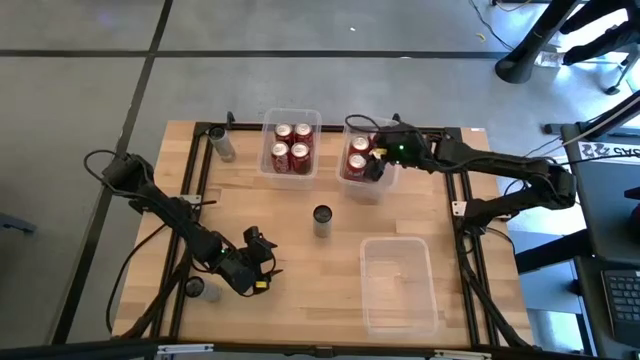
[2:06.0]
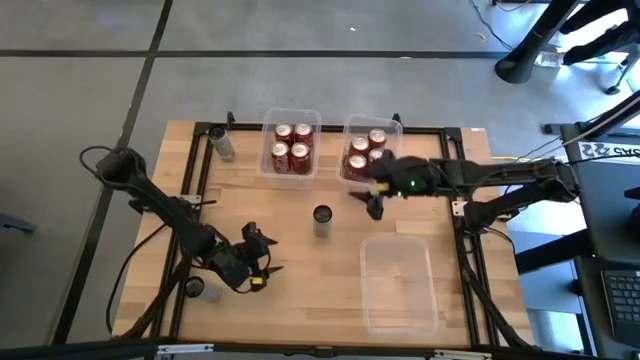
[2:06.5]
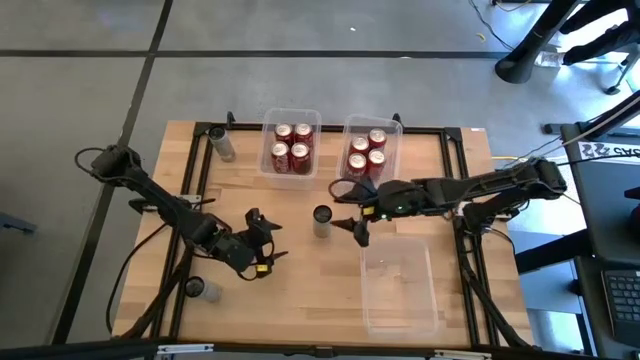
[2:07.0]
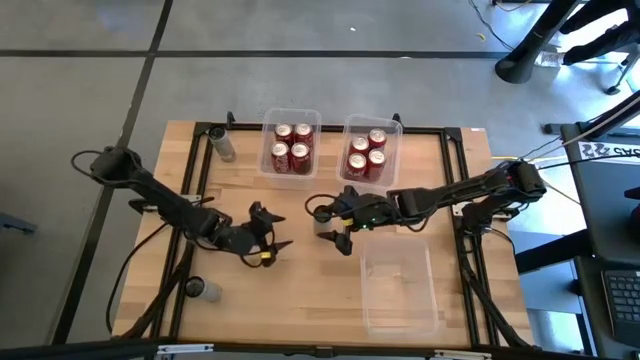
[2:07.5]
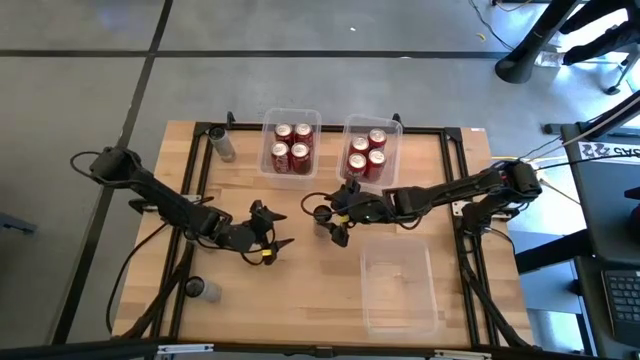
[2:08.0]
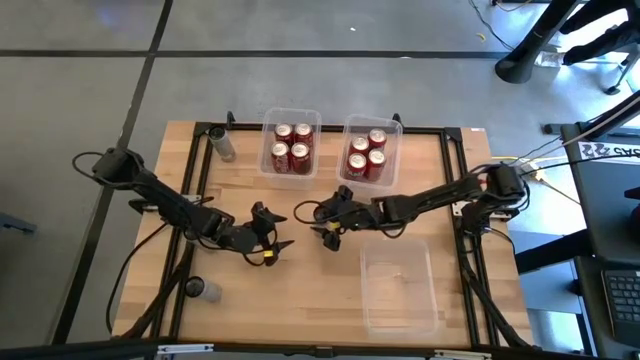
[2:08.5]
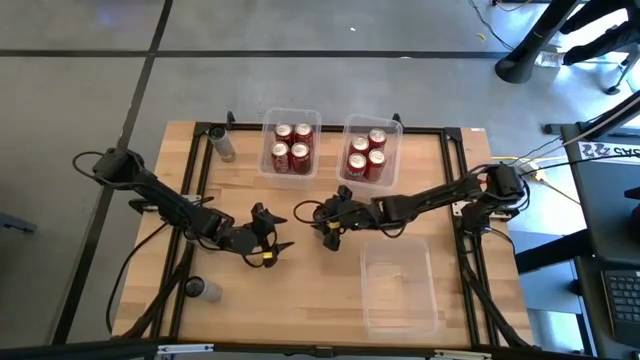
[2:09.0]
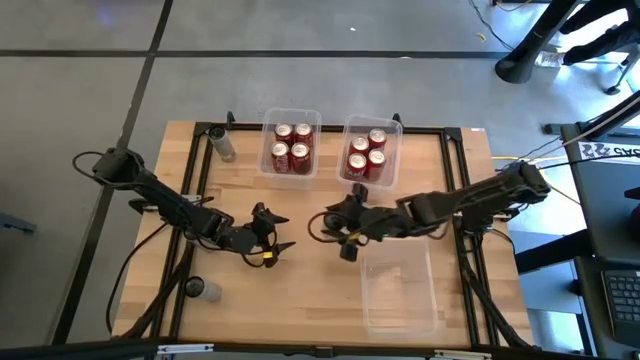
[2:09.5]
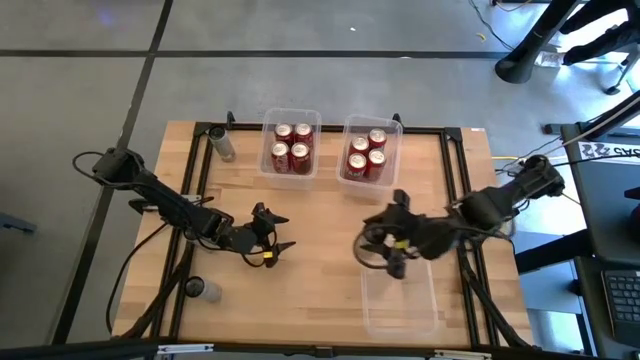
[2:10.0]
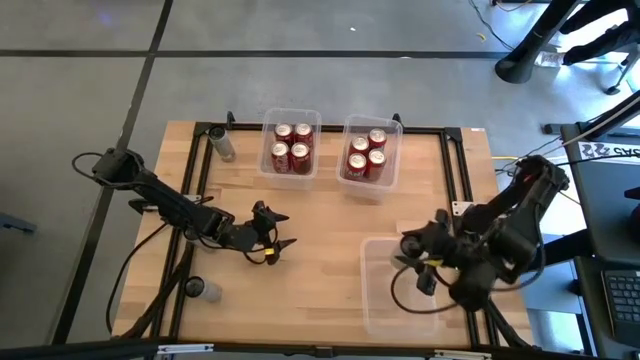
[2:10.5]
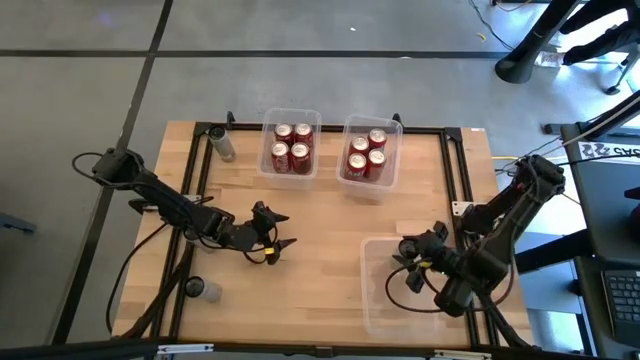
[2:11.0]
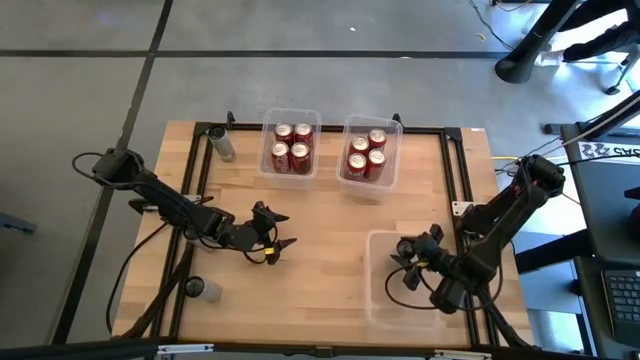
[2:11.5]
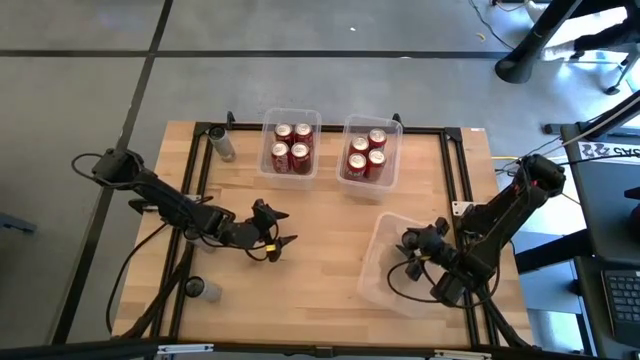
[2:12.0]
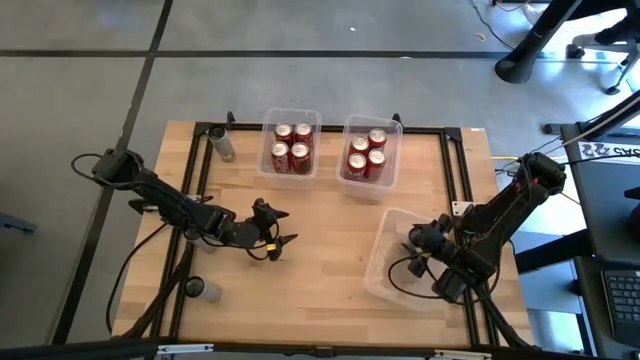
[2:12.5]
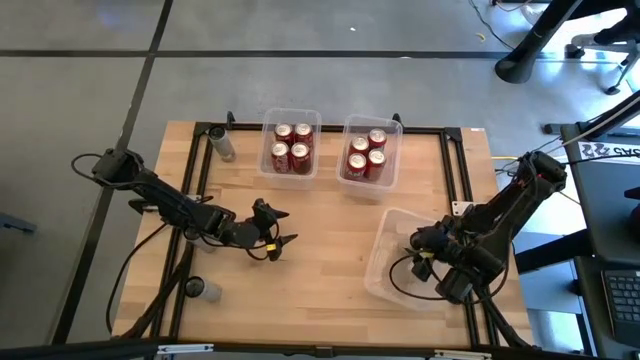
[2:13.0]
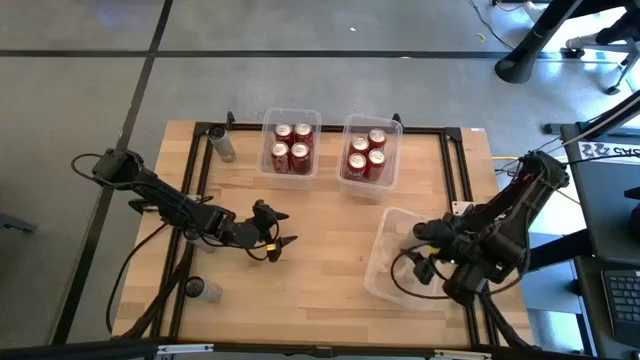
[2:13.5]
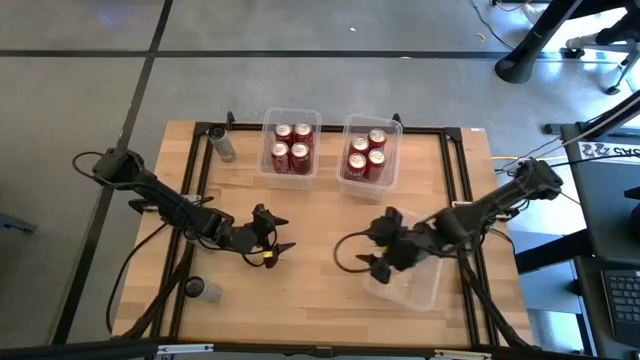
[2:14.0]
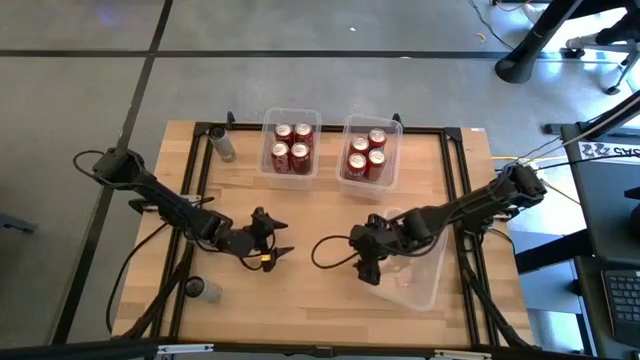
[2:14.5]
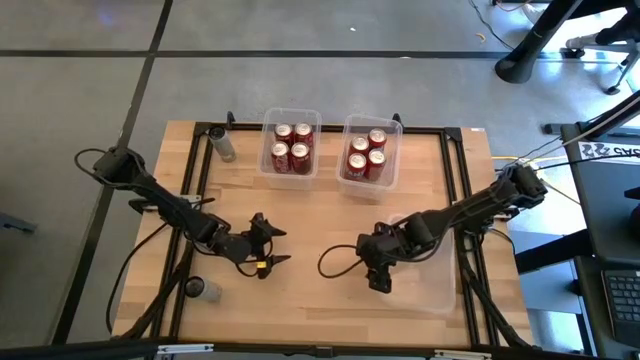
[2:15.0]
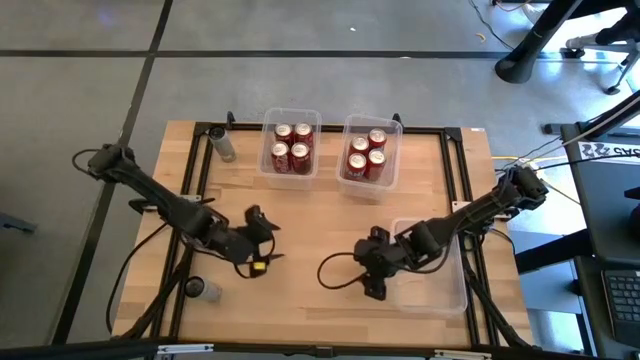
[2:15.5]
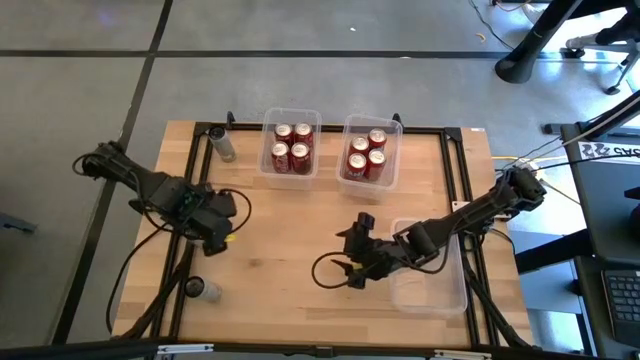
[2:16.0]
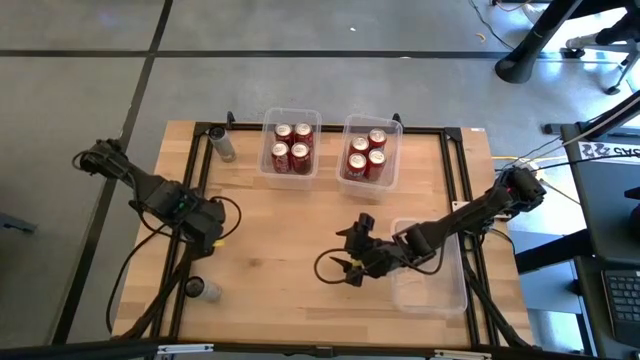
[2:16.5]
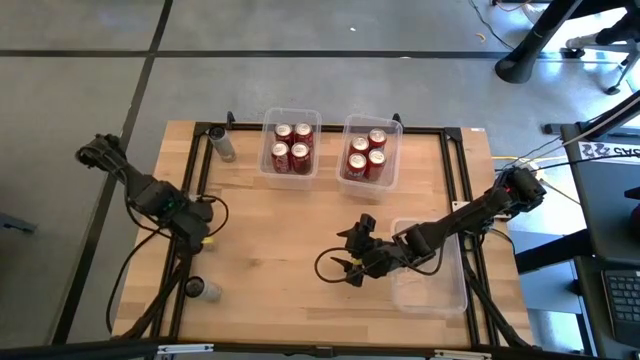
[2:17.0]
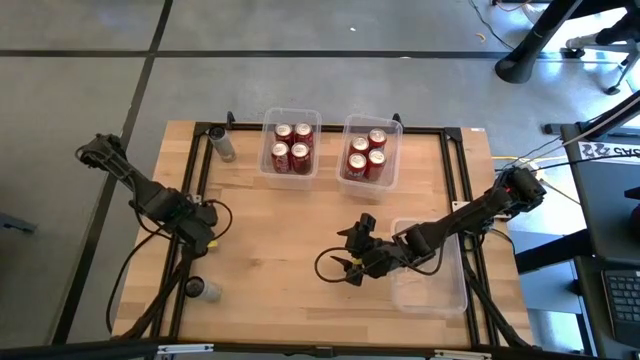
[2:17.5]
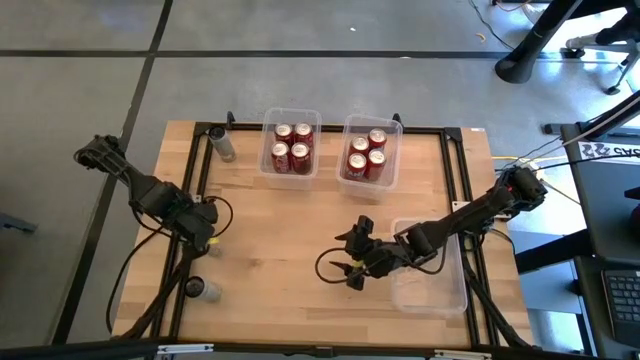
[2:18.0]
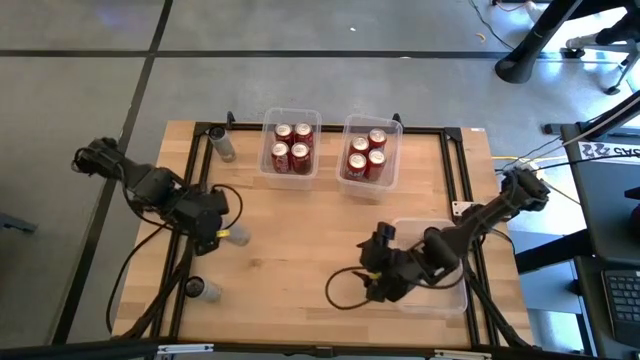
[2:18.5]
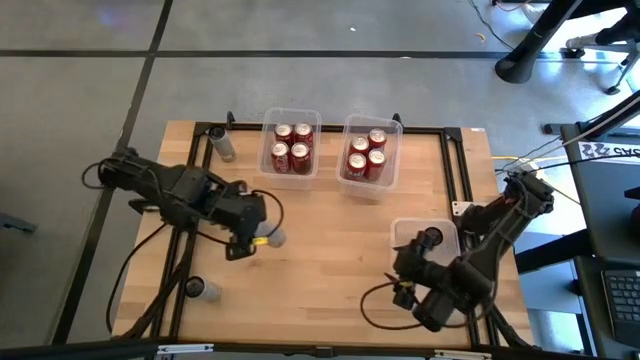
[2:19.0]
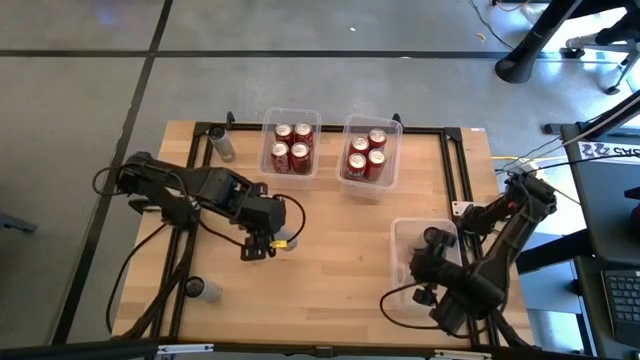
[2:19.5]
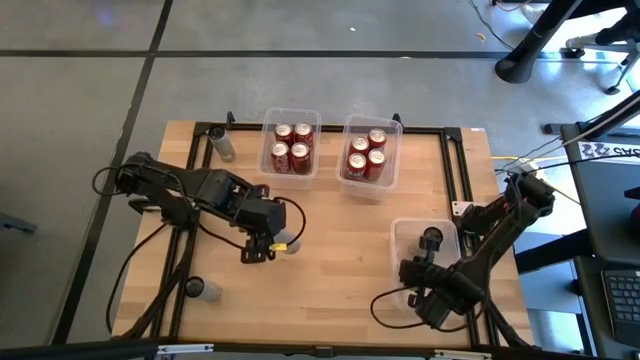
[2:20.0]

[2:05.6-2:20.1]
Task: Sort soda cans
Put the center white soda can into the bottom right transparent bin

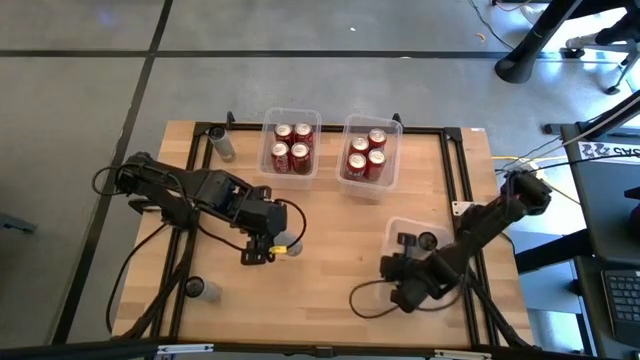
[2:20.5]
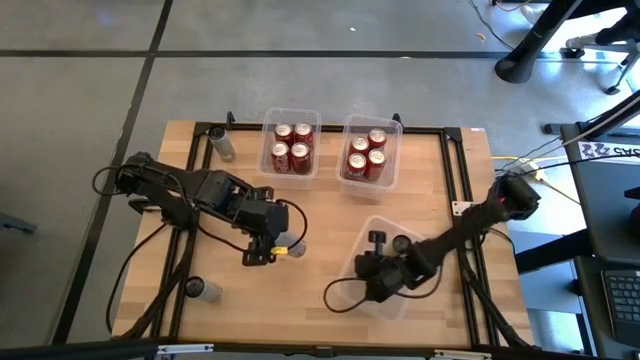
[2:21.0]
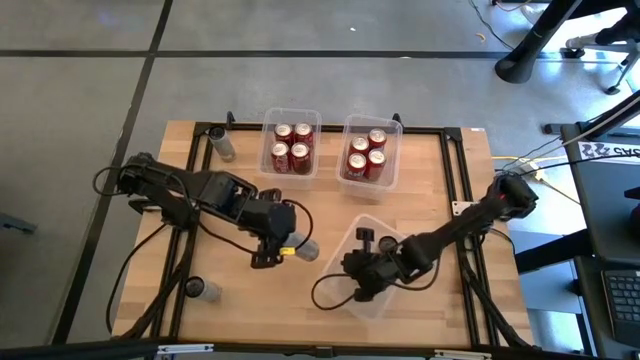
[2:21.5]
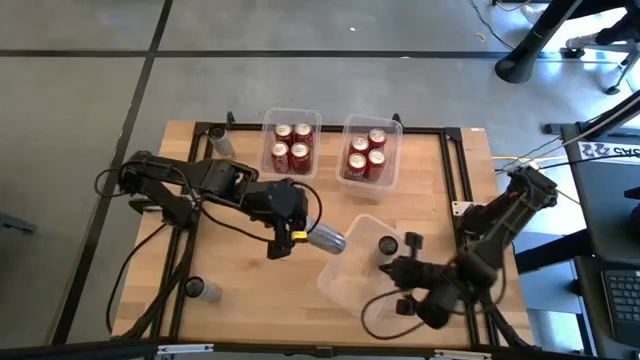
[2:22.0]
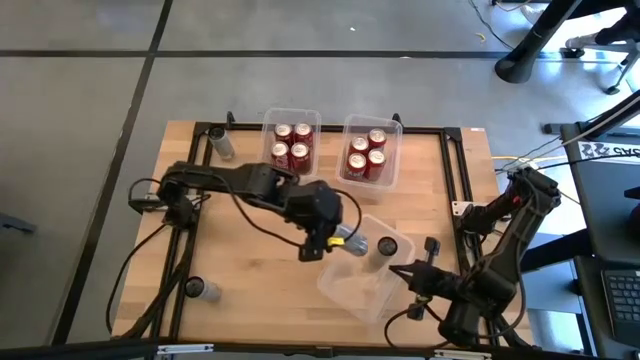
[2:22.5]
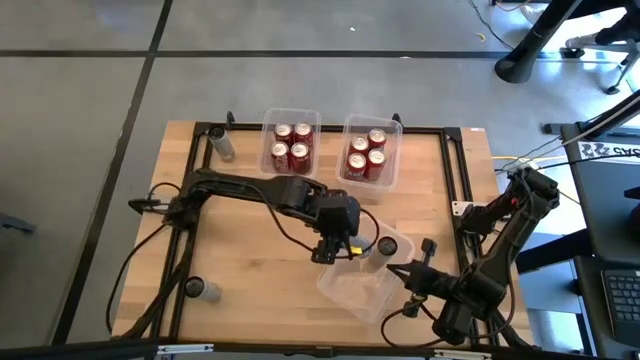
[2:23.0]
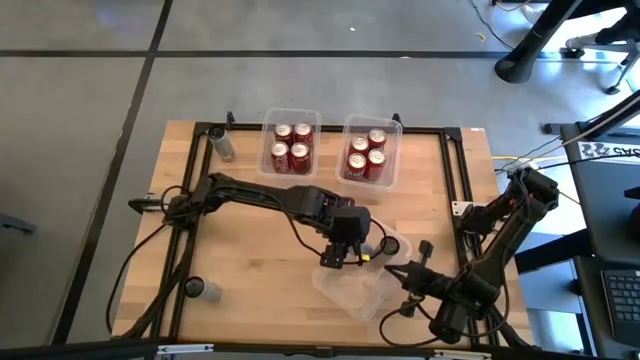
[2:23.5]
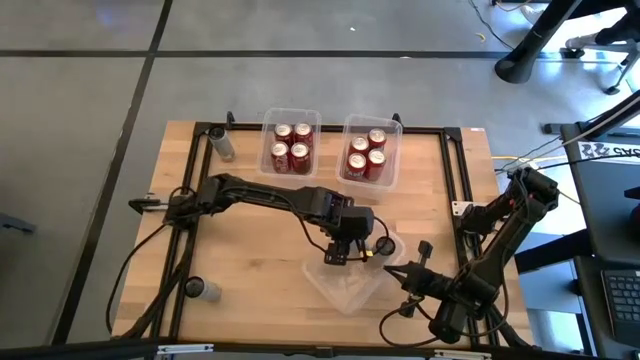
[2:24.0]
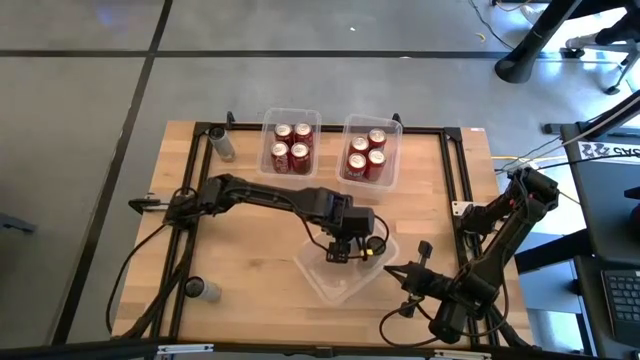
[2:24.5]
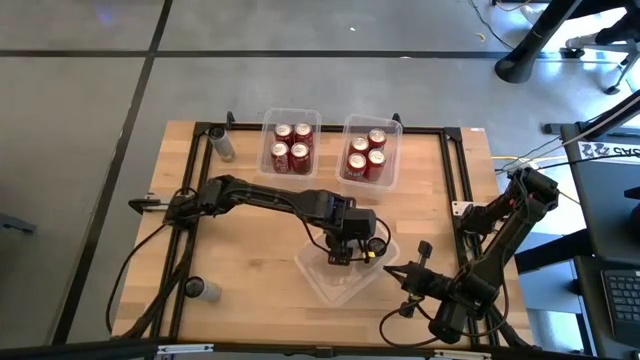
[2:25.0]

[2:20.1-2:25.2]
Adjust the bottom right transparent bin

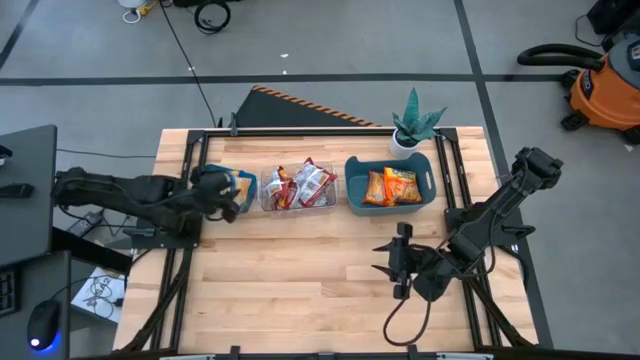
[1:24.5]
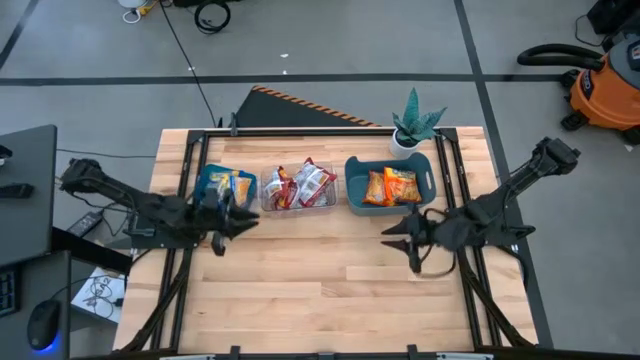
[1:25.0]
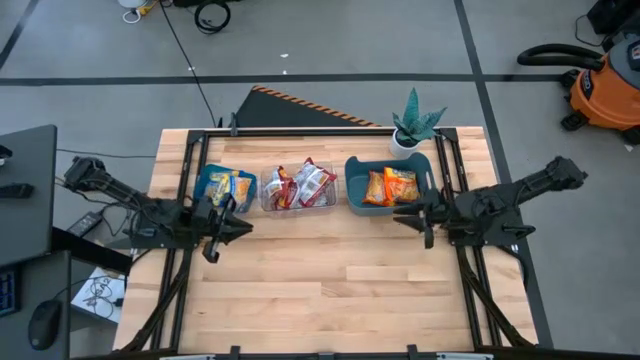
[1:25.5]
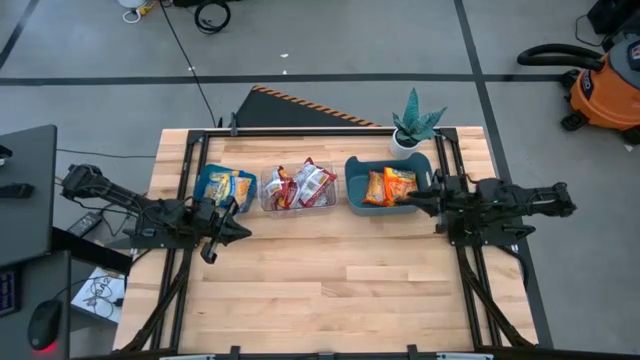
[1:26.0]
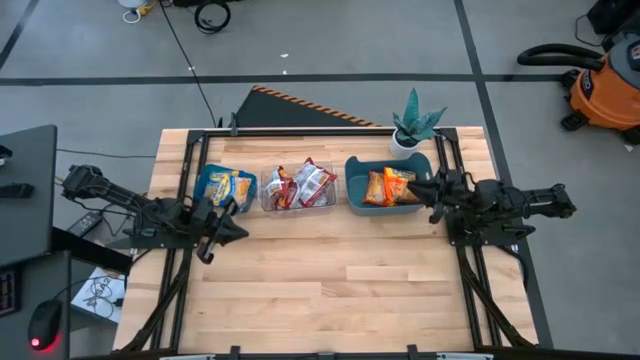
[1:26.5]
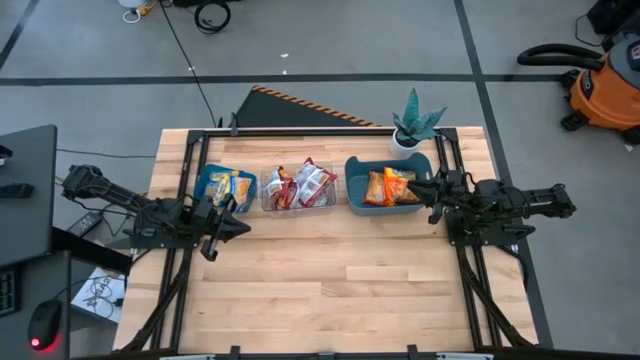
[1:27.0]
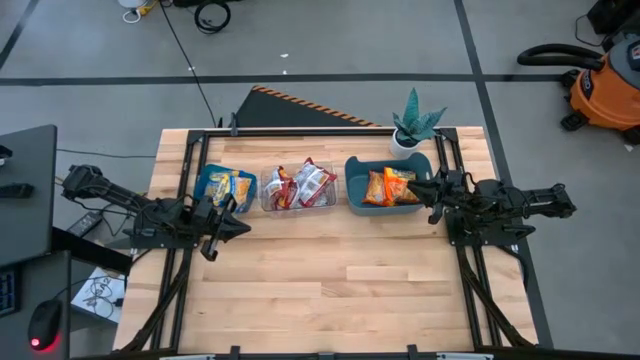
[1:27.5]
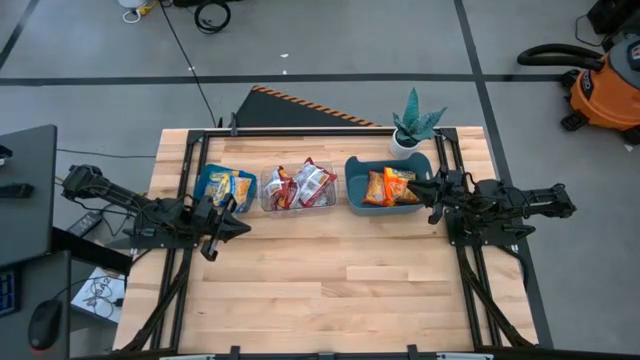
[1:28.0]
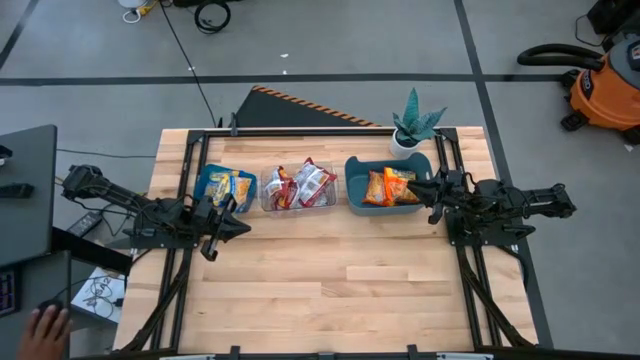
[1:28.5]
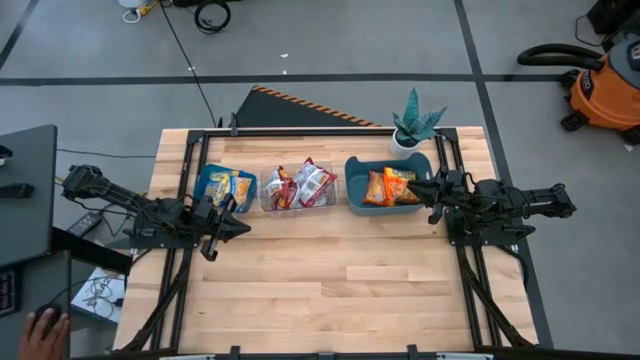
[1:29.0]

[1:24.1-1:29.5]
Task: Sort Maruchan noodles
Return to Home Position
